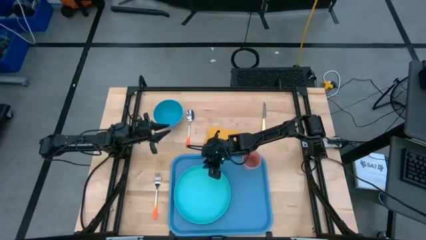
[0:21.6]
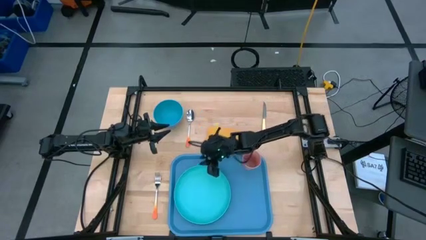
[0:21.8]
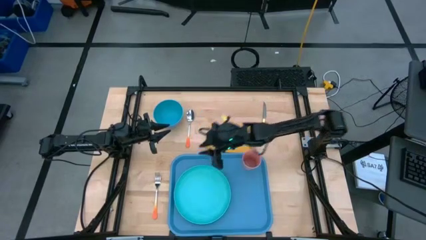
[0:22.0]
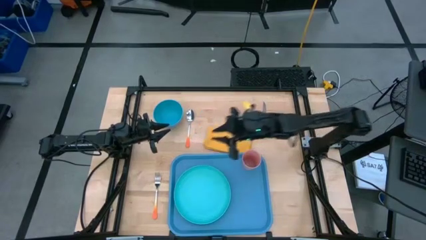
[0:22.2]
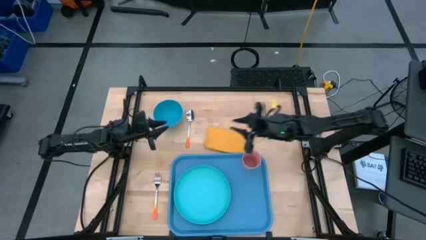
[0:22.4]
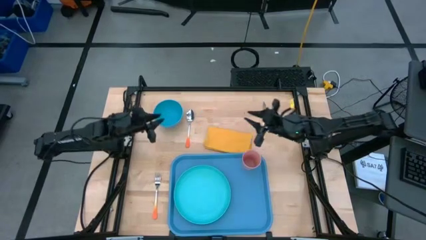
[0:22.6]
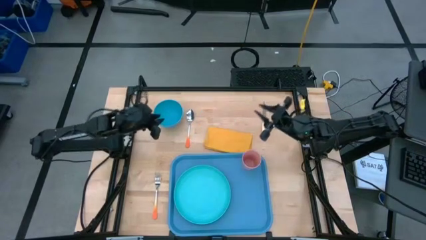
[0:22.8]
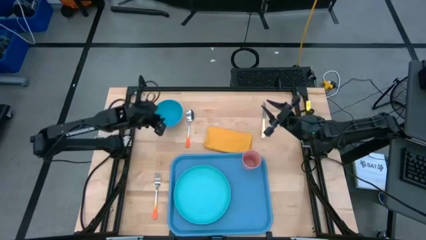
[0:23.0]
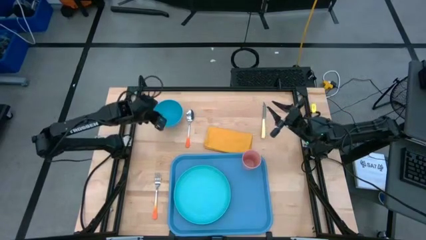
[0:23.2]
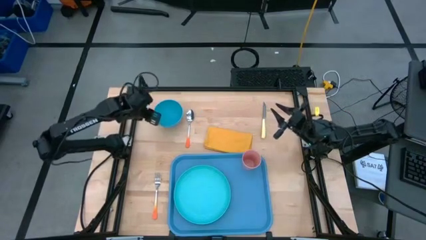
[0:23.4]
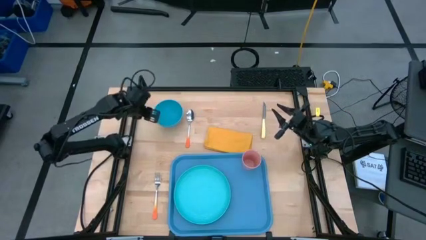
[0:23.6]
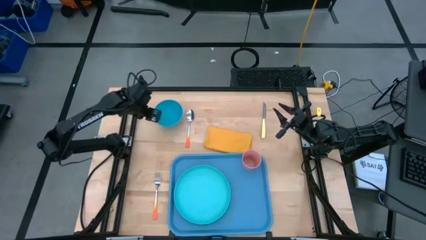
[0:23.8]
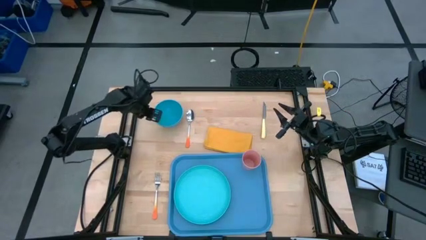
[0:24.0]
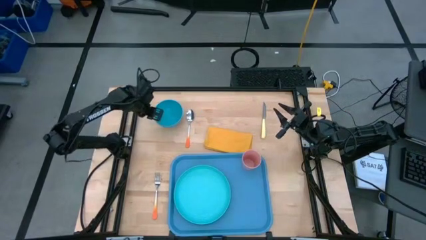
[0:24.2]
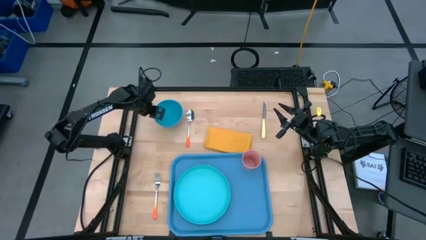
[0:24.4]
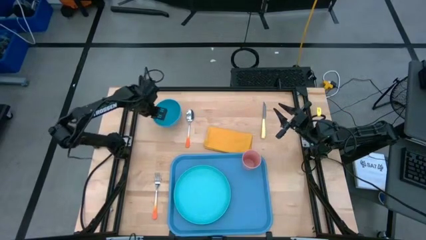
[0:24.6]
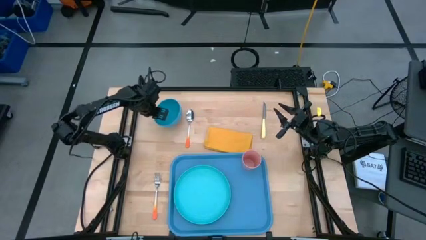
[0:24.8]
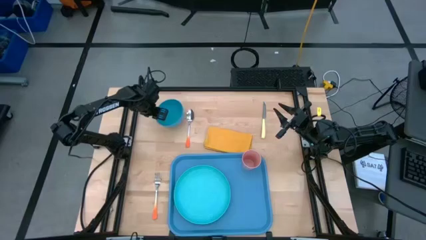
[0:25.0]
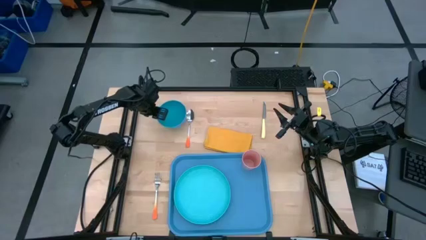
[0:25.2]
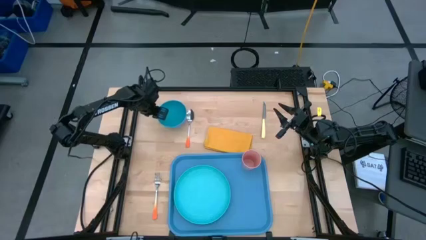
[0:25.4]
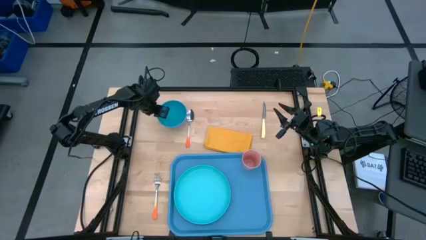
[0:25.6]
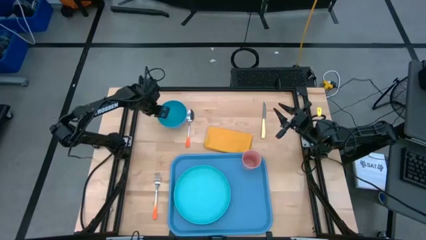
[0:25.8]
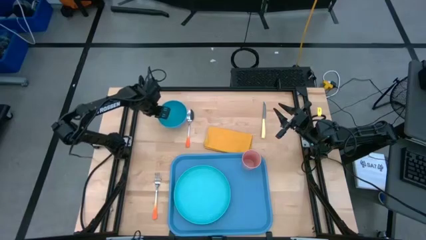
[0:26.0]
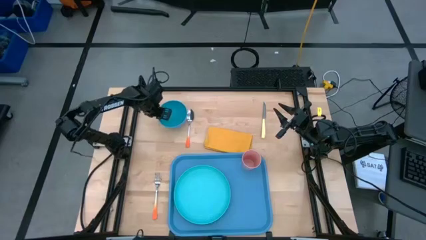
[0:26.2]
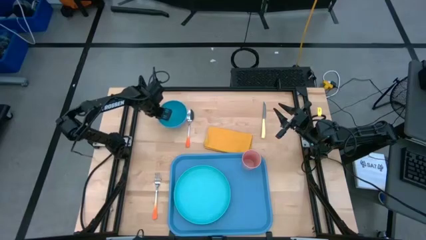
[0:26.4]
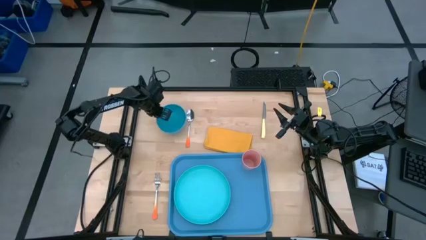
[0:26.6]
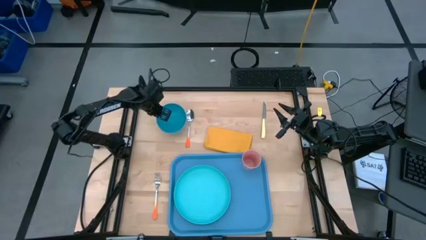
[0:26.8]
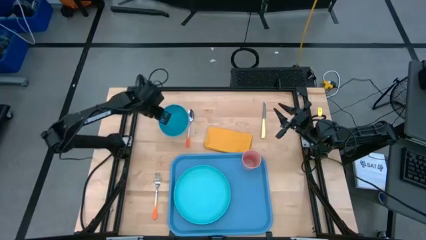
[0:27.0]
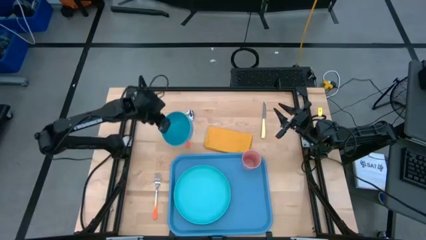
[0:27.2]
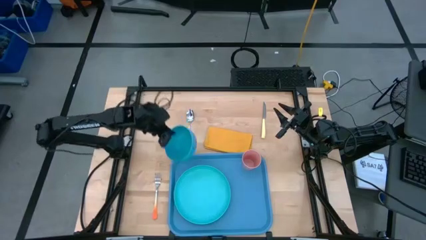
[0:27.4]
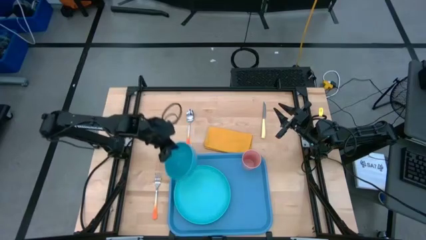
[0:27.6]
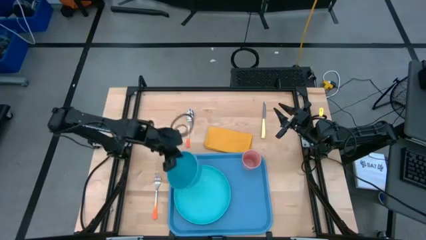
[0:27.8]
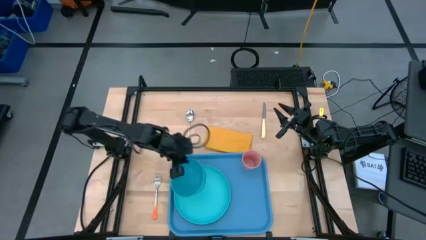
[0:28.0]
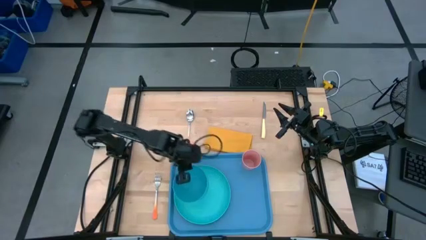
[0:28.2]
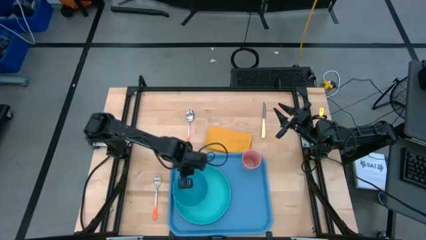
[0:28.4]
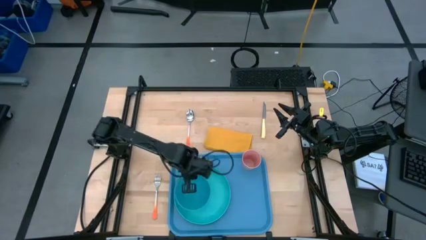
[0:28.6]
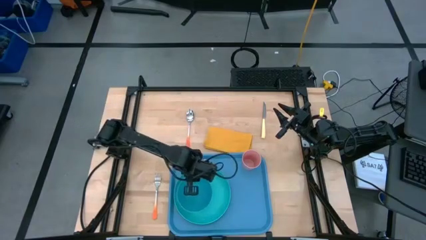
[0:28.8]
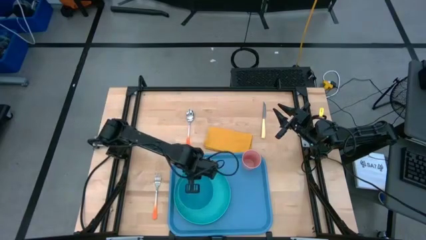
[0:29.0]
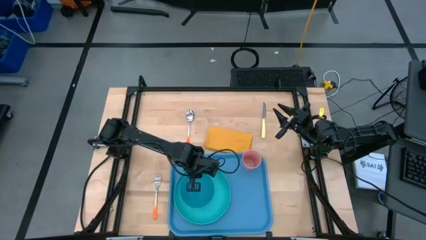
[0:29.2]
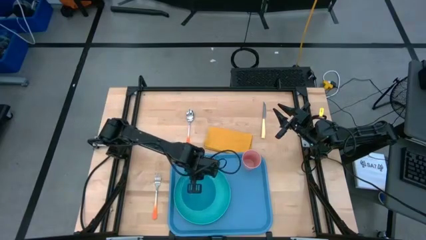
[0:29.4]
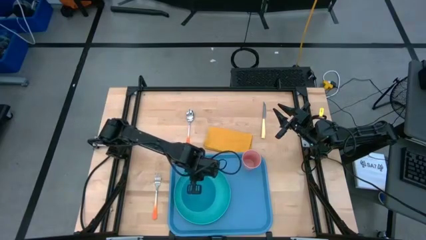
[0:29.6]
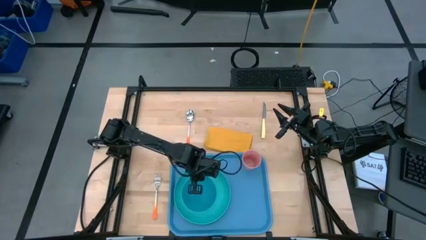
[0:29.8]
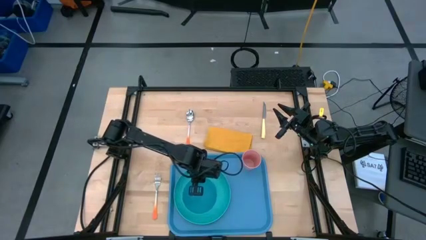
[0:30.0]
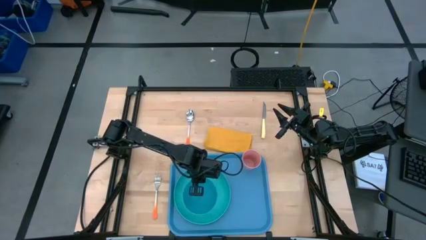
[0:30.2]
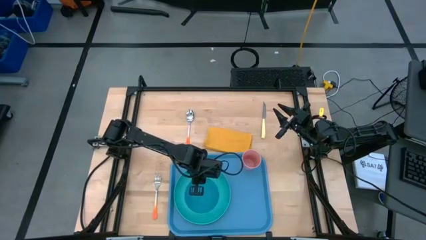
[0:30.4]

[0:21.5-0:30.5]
Task: Set up tray
Put the blue bowl on the light green plate

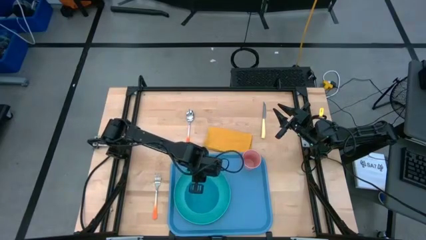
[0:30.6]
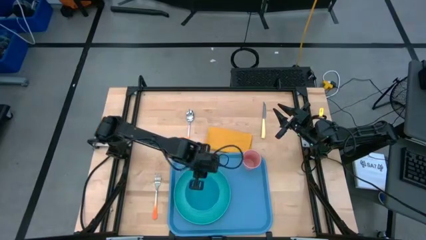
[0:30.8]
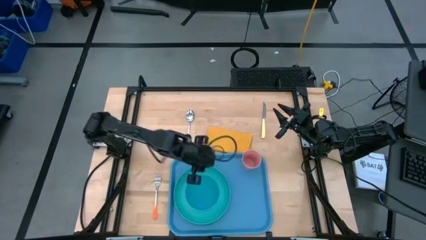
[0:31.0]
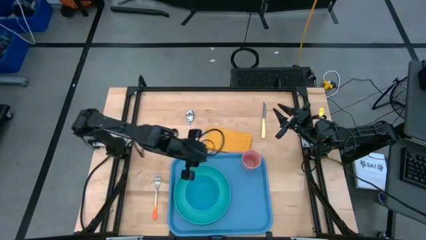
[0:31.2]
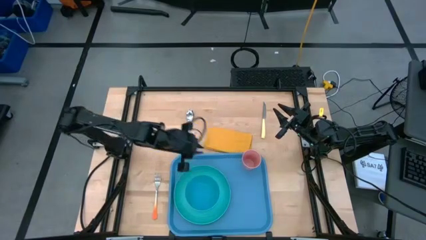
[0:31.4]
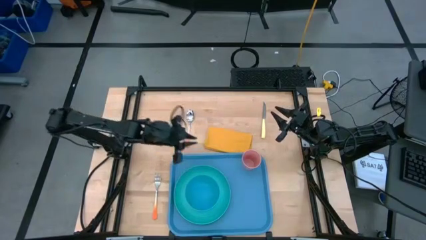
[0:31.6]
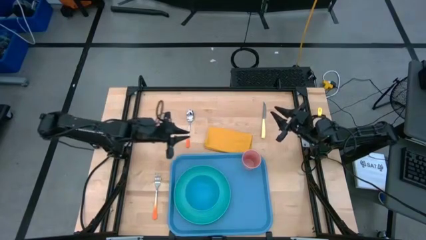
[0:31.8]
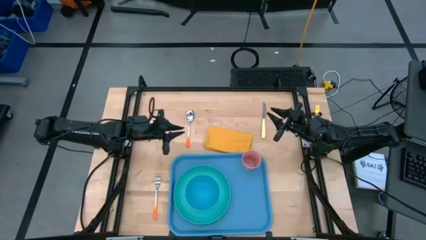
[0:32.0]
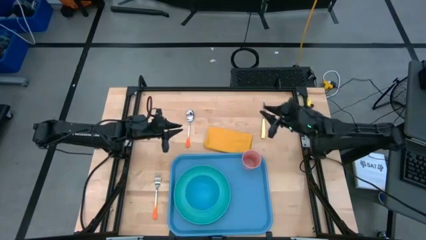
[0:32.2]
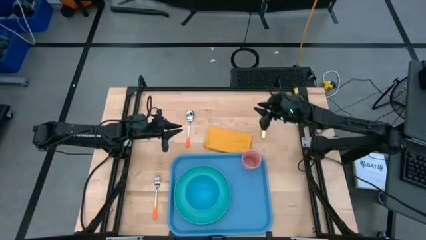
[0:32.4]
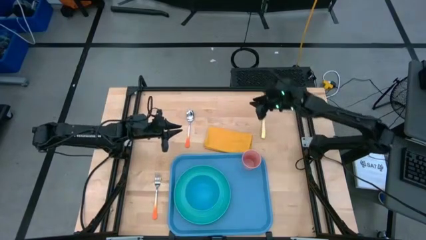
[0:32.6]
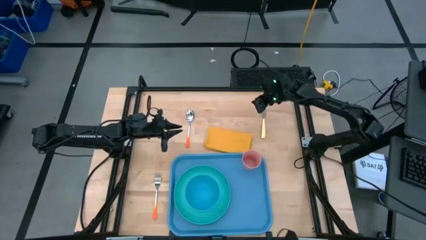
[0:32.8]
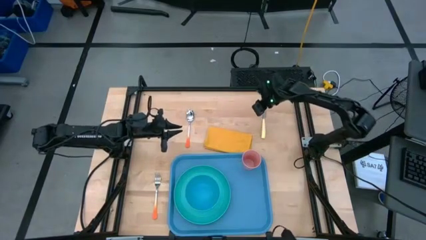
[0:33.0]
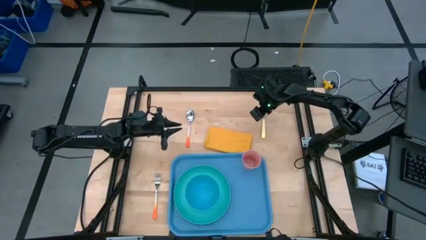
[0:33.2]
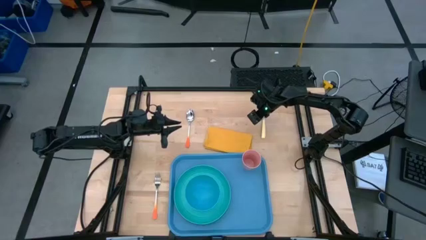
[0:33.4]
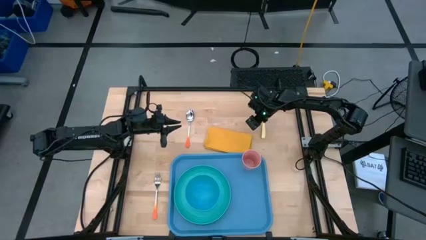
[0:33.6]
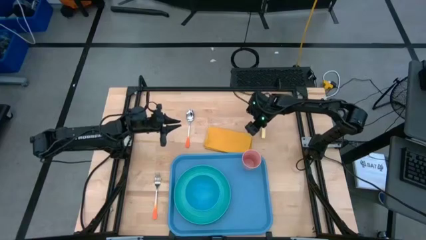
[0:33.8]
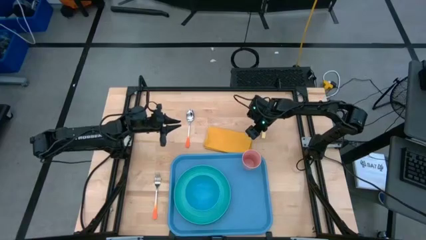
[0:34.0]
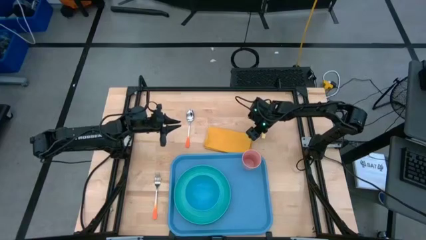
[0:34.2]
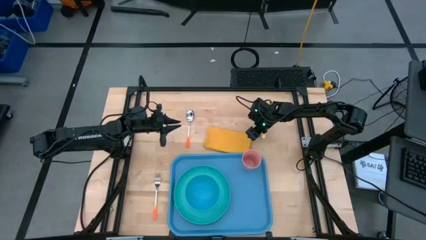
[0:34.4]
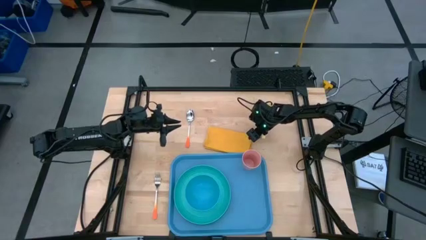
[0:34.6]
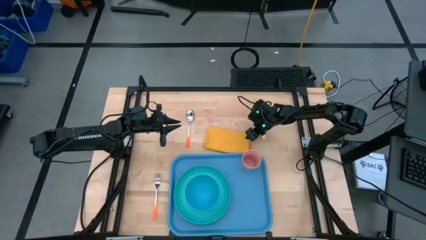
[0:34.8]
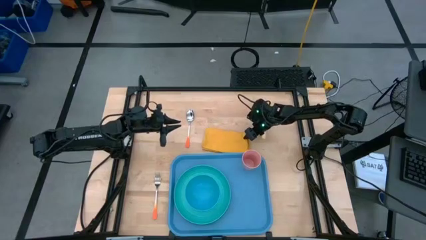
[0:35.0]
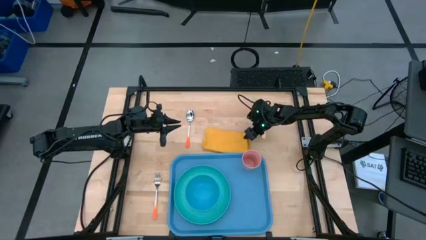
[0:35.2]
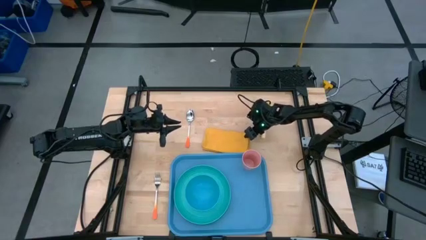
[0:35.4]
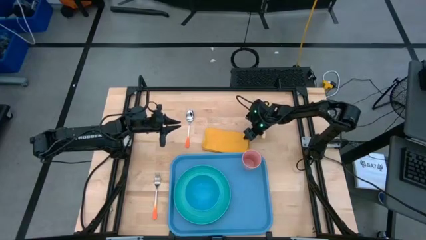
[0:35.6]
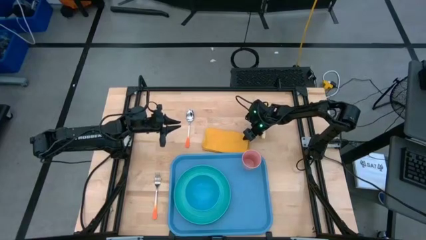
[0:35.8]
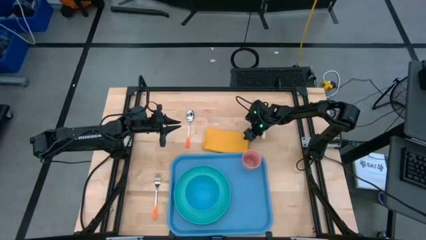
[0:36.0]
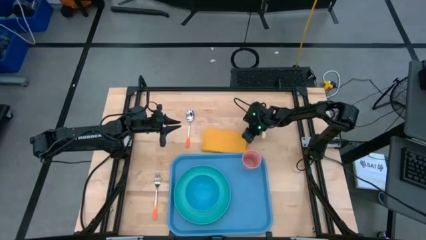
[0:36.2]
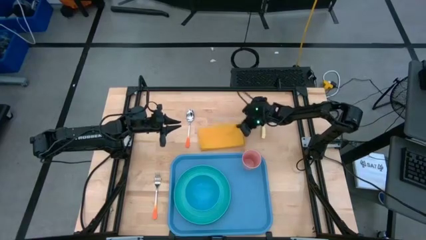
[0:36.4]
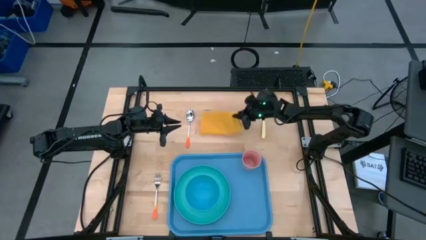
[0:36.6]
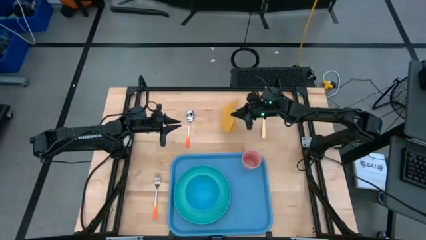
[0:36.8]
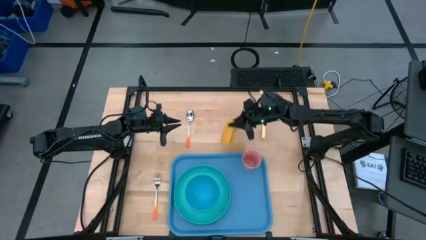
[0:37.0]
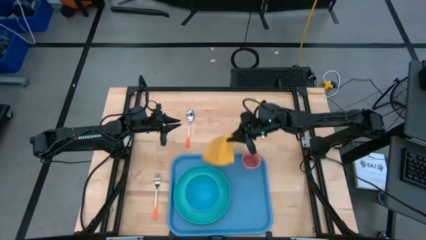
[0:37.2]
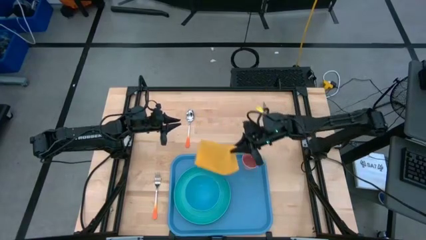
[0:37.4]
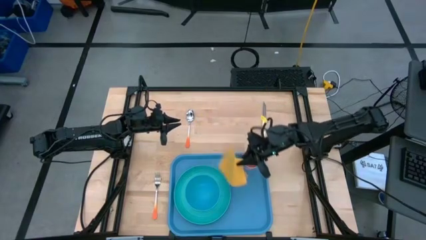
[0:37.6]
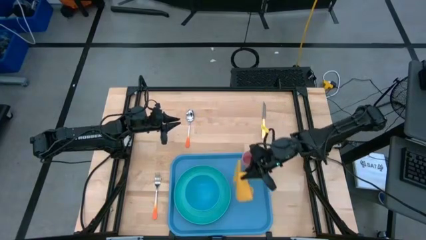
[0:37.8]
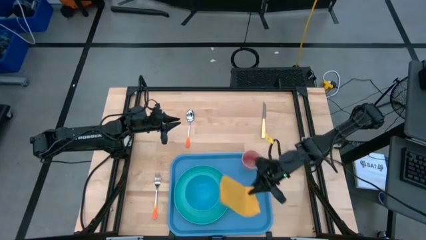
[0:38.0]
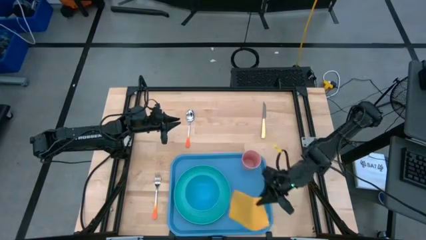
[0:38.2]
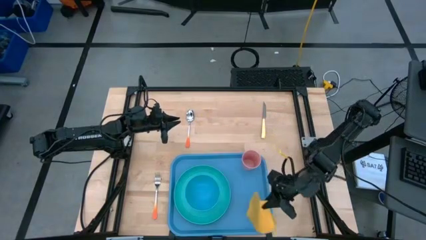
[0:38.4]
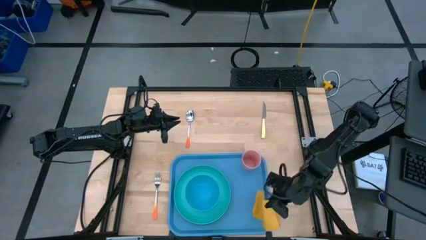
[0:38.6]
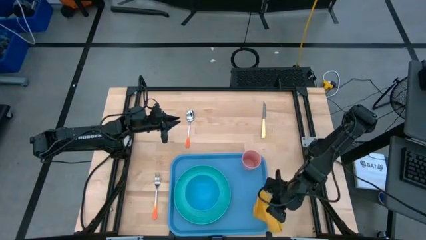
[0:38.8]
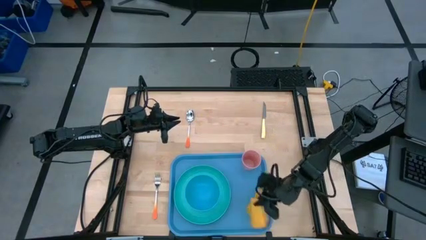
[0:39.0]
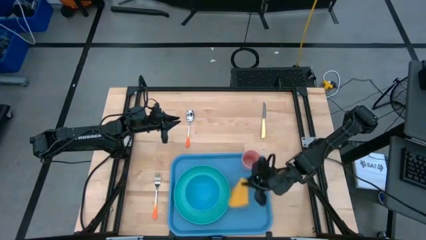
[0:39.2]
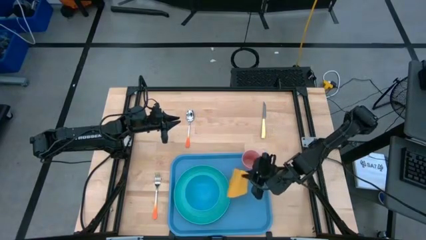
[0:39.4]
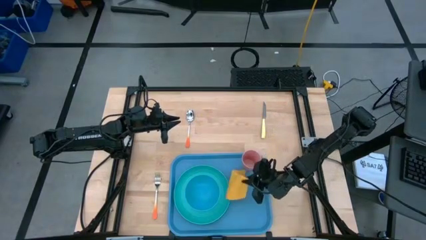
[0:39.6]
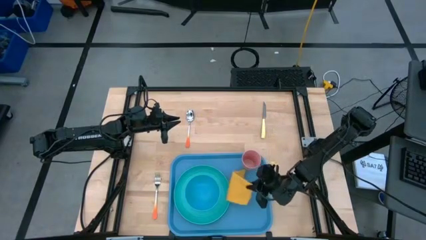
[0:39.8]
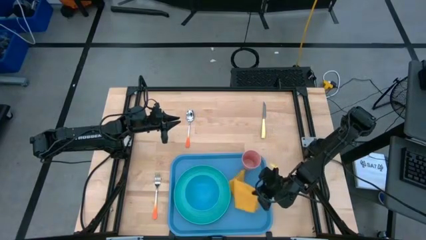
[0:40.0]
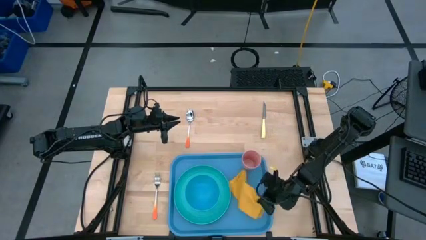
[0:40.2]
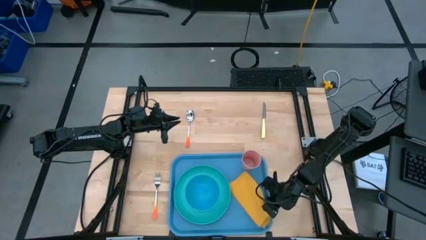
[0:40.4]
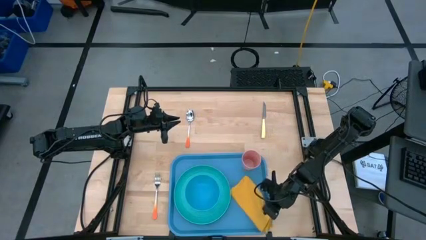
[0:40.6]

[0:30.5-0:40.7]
Put the yellow napkin on the blue serving tray to the right of the light green plate
